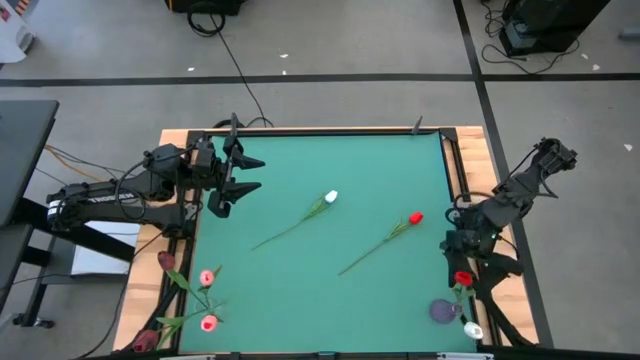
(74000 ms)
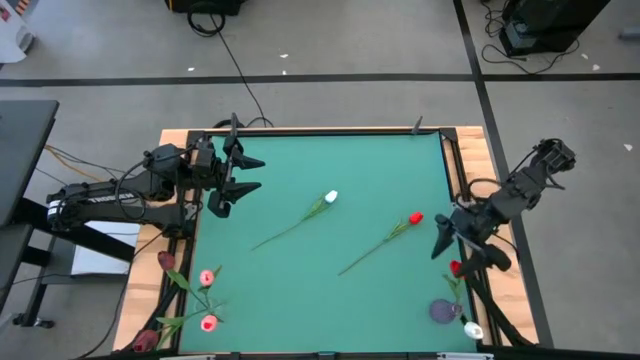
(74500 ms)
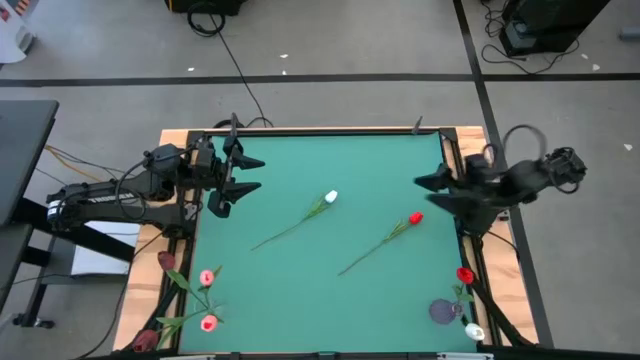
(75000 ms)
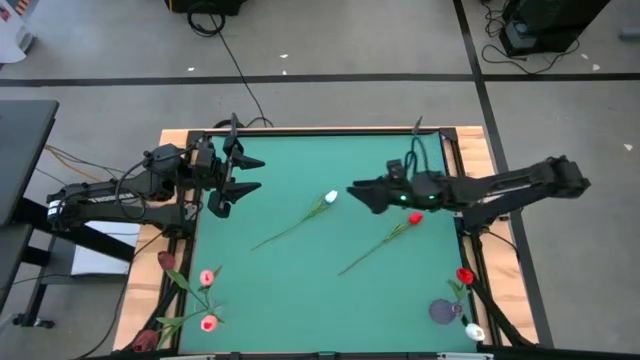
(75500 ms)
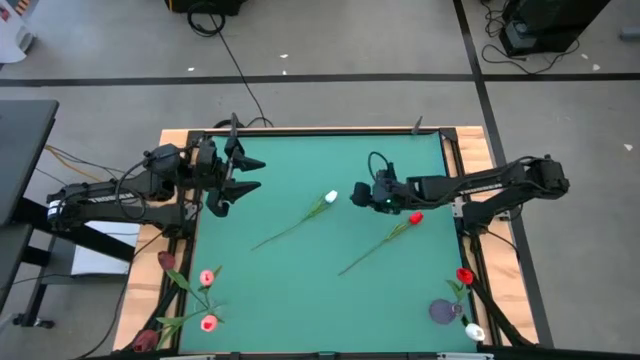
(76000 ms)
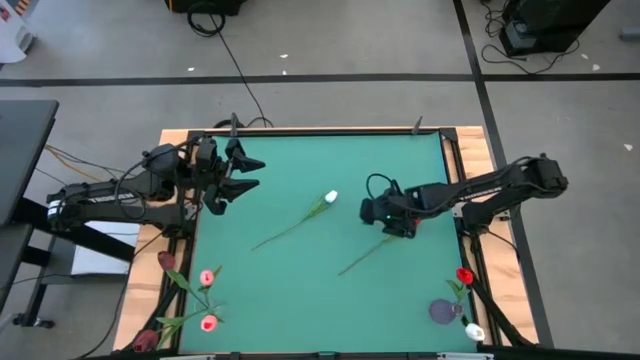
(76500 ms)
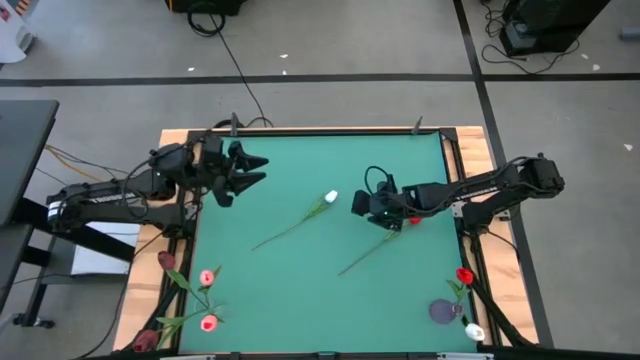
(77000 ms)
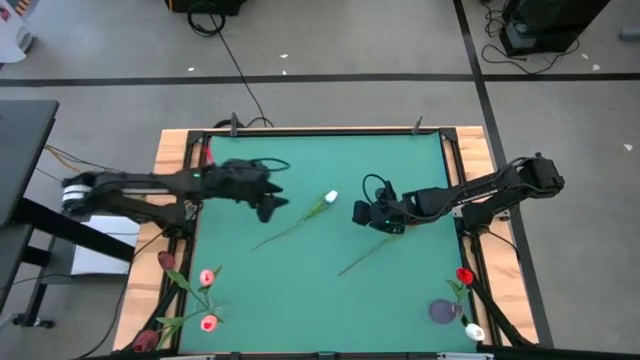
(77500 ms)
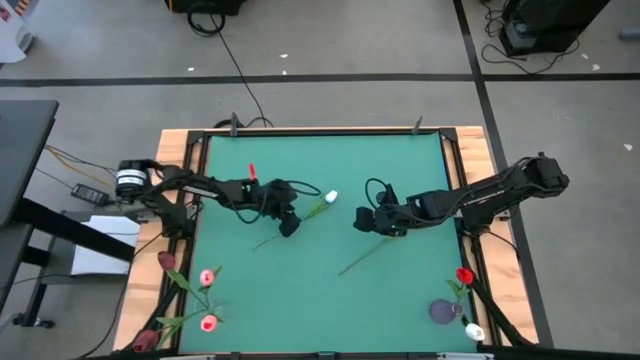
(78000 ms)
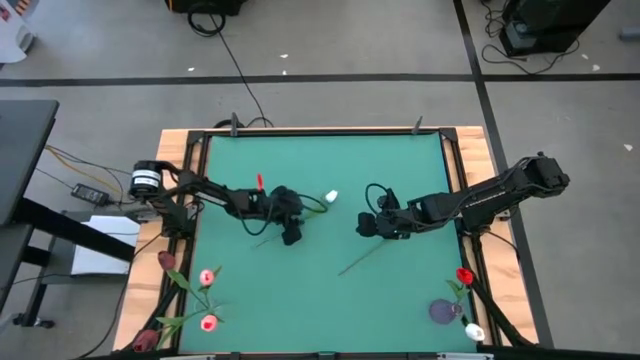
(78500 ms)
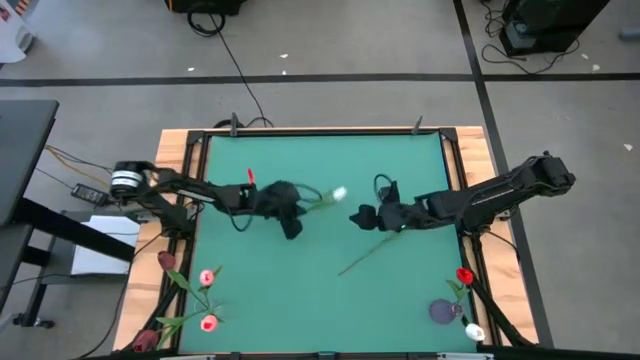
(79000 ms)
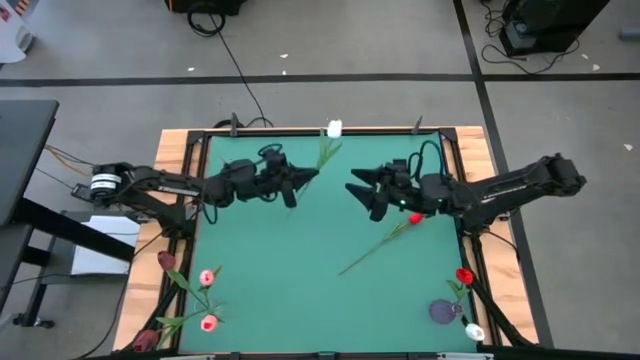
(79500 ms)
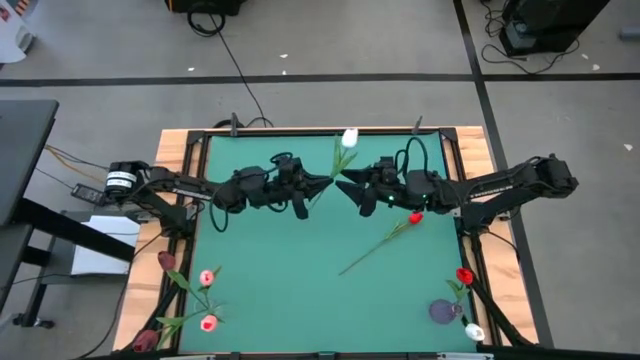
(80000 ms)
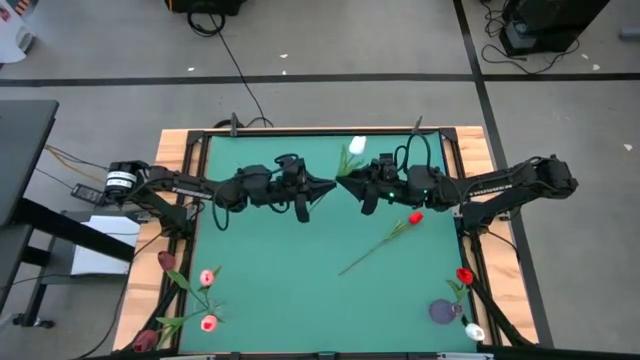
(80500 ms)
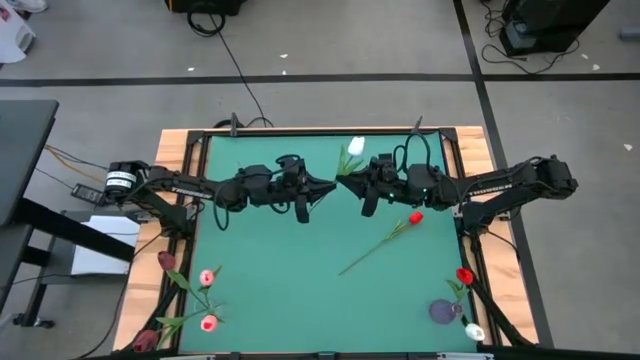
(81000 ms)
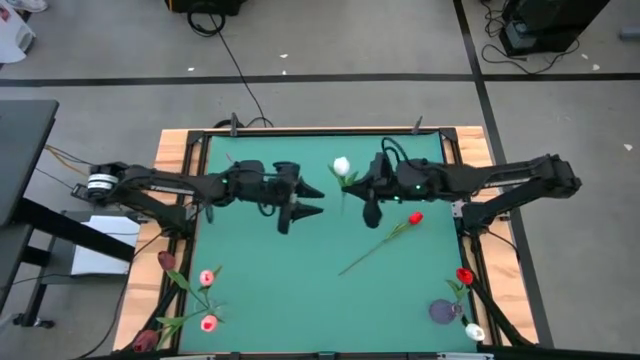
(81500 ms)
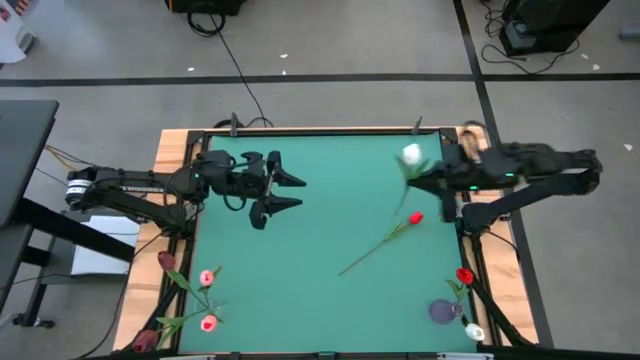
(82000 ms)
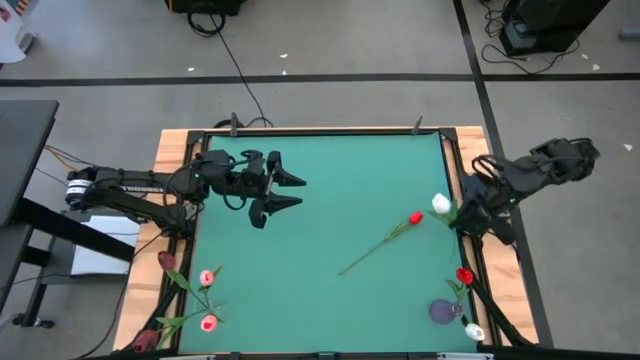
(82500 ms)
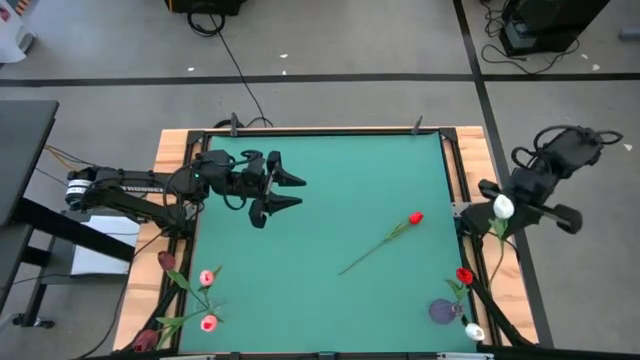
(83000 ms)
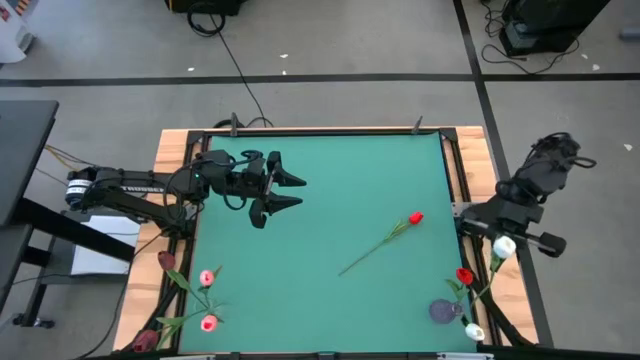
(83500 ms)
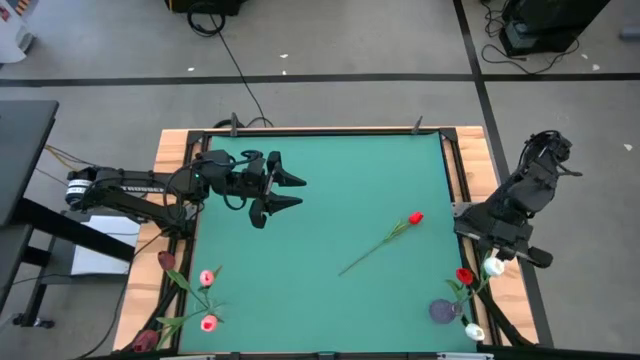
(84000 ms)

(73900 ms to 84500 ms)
Task: Sort flowers into vase by color
Put the white flower into the violet vase

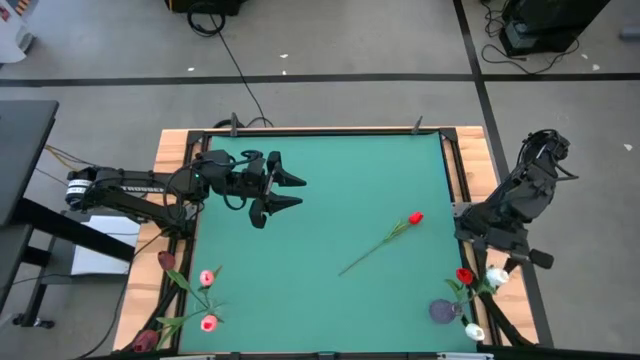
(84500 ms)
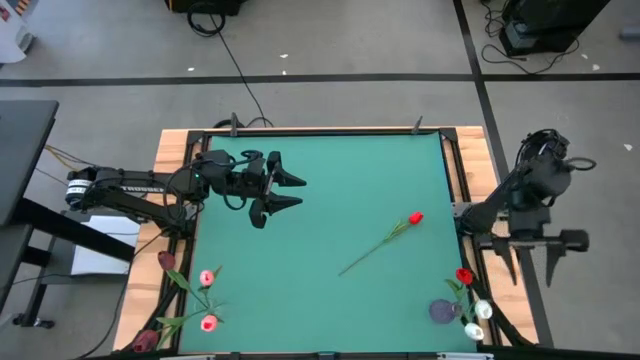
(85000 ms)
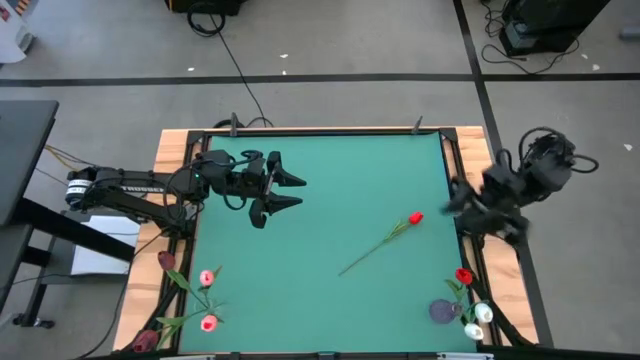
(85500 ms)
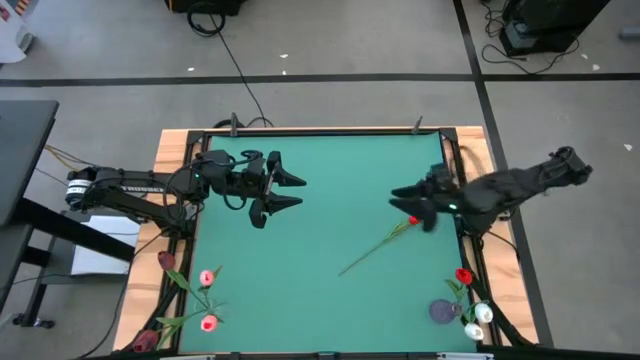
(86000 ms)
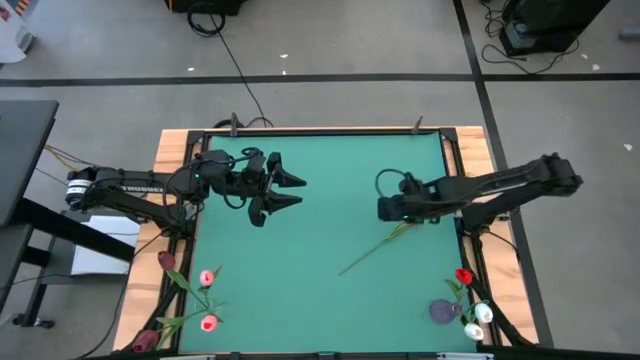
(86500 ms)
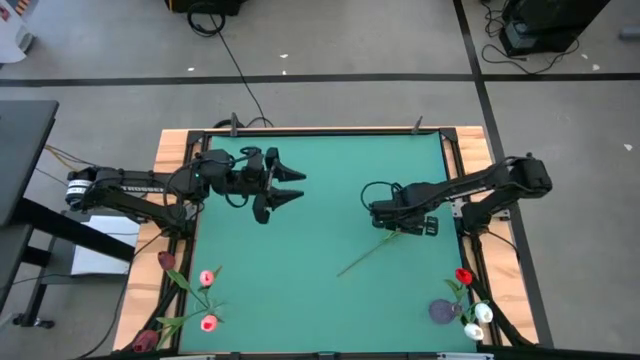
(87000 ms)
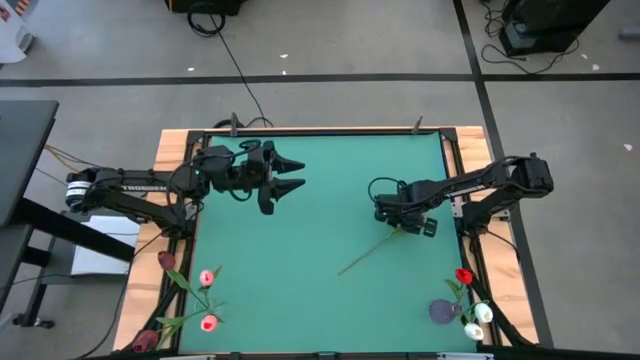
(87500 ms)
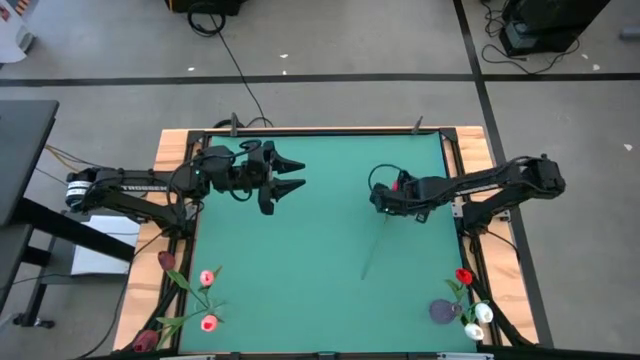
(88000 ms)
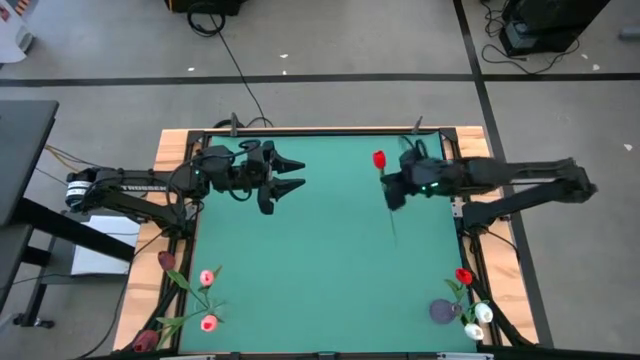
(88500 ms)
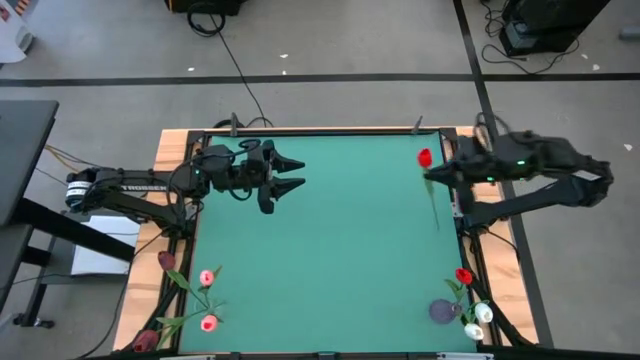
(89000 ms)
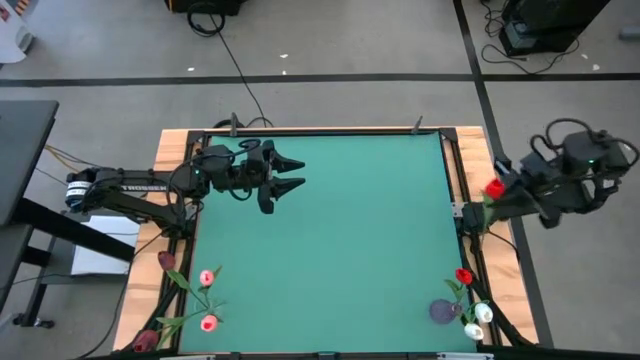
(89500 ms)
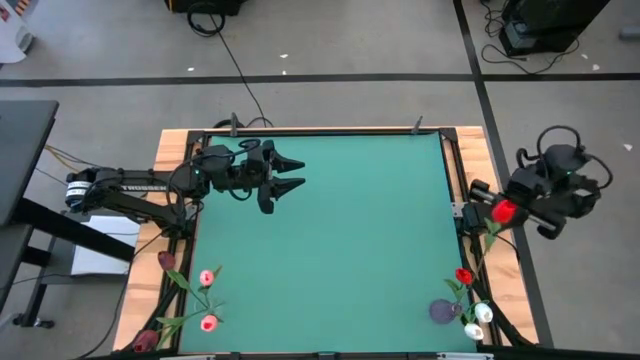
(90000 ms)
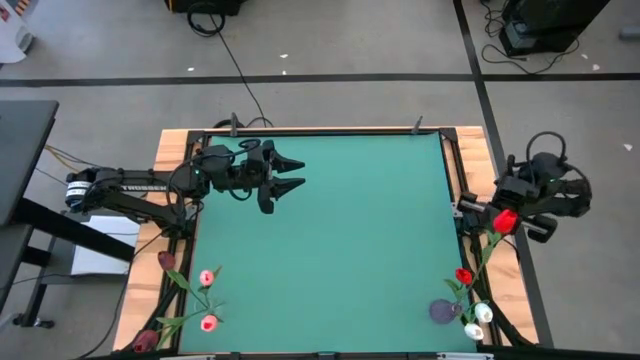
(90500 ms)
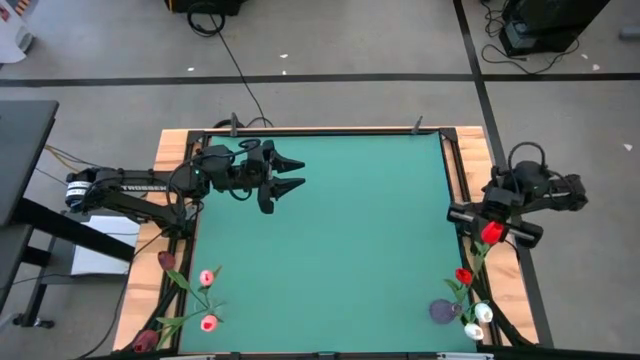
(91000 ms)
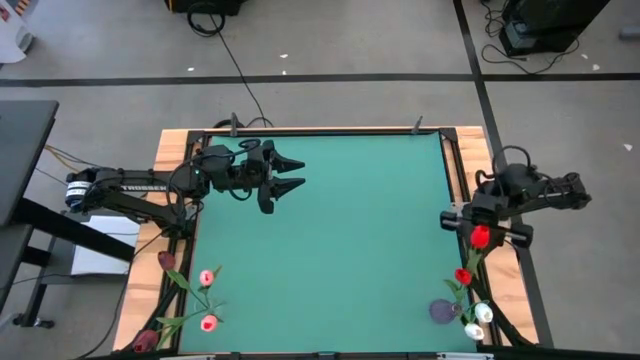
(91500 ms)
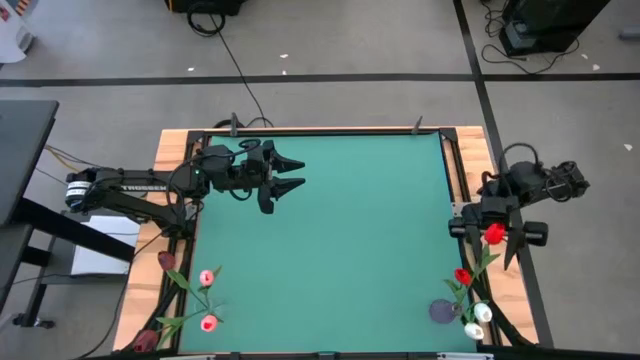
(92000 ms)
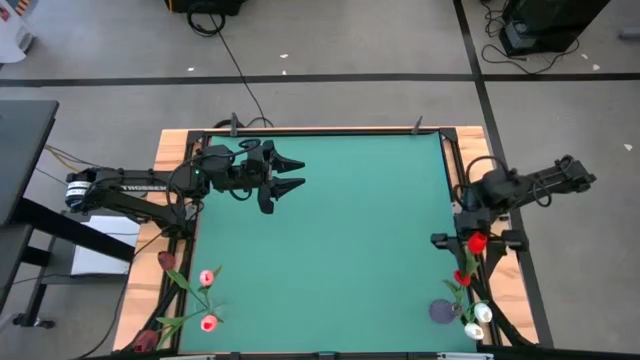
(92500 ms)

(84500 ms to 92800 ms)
Put the red flower into the violet vase

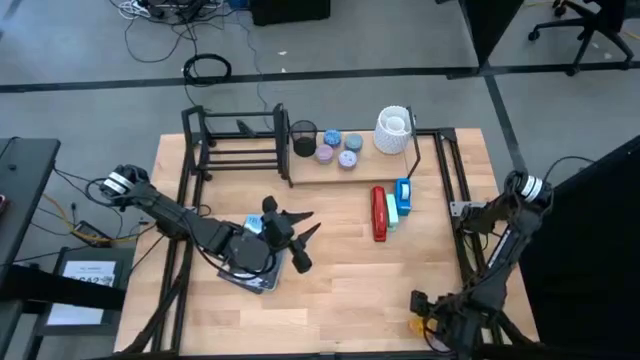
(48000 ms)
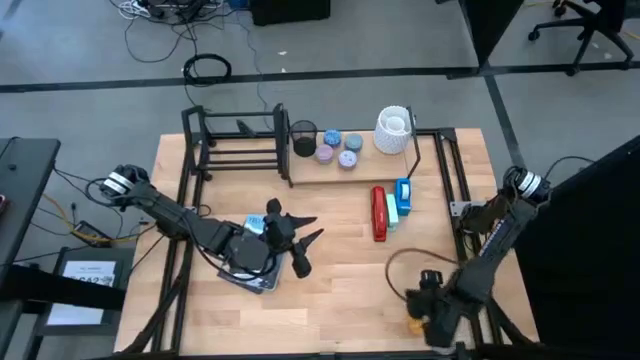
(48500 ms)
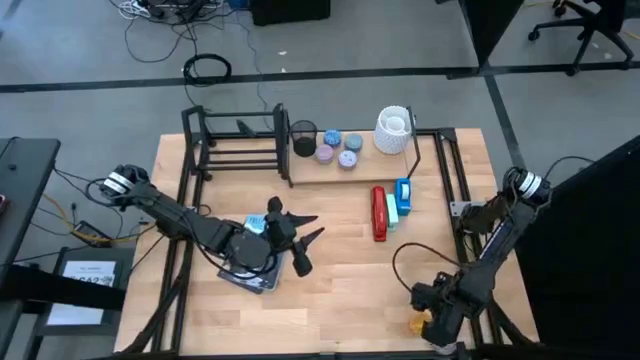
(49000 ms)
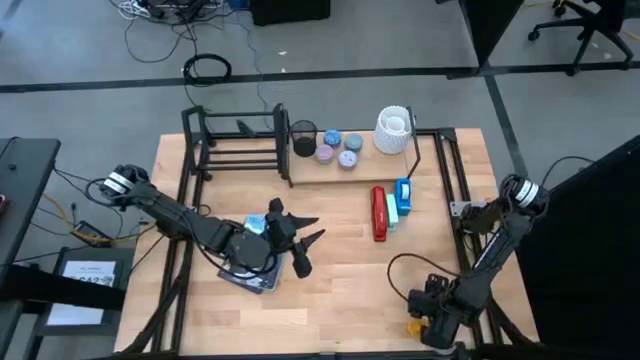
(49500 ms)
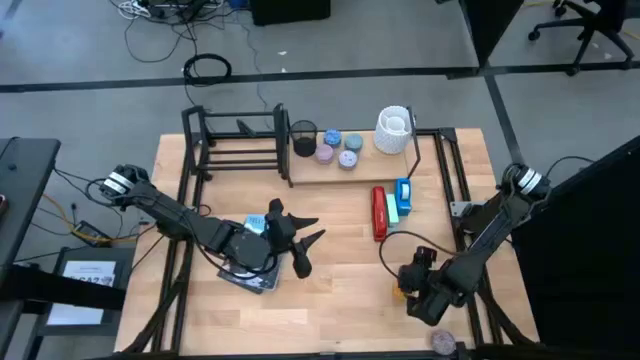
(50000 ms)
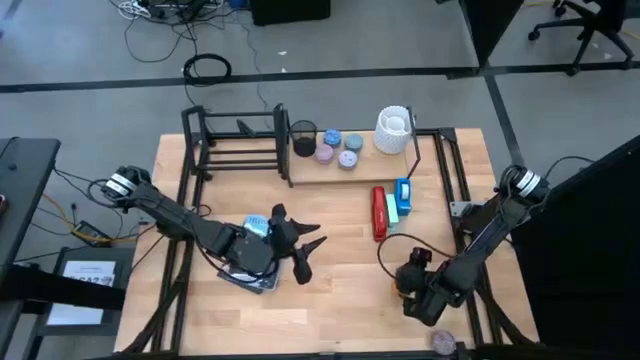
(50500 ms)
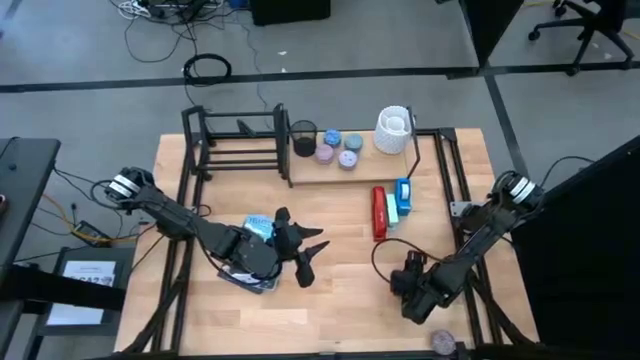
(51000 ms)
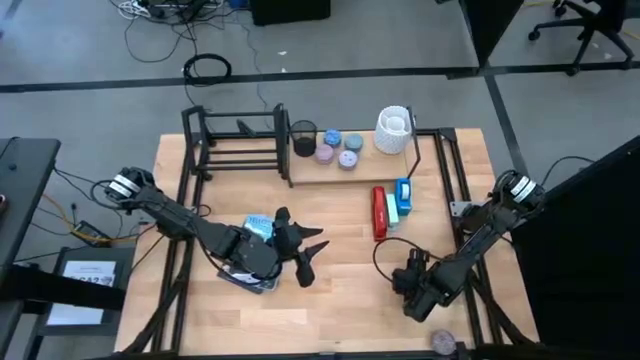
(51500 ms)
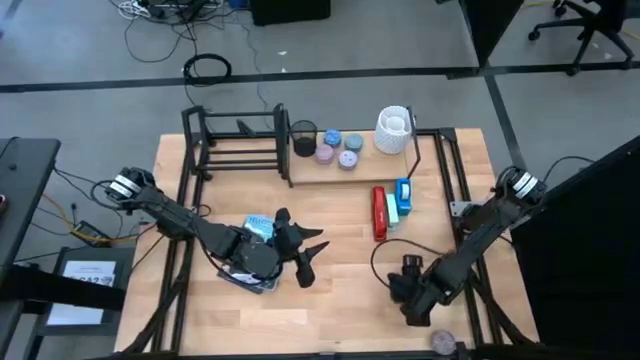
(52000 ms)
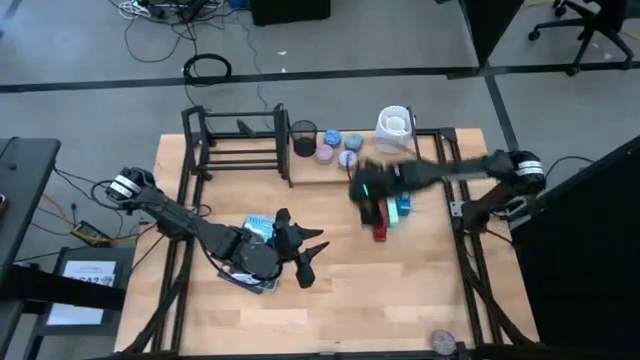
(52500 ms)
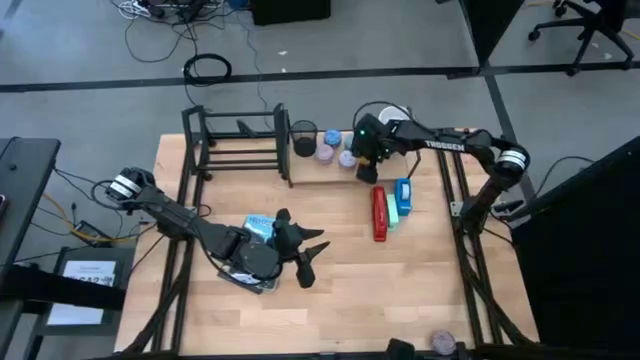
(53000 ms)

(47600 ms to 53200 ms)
Task: Stock shelves
Put the yellow scented candle on the shelf
